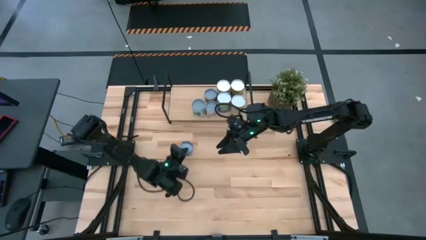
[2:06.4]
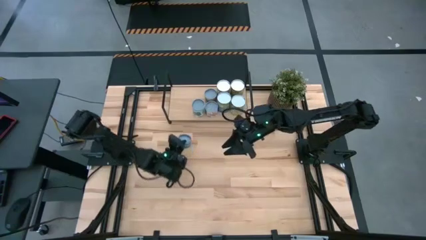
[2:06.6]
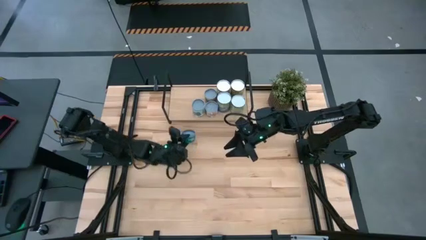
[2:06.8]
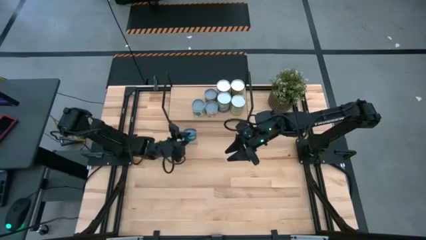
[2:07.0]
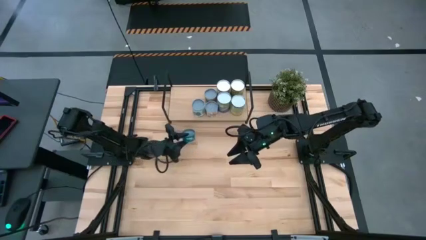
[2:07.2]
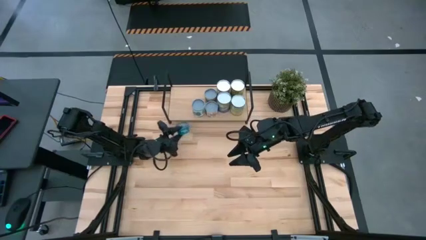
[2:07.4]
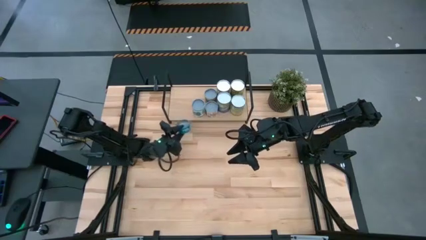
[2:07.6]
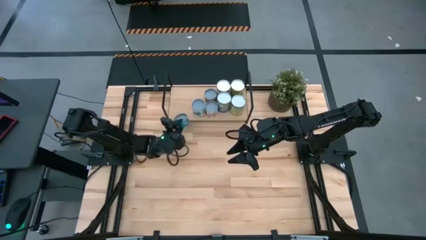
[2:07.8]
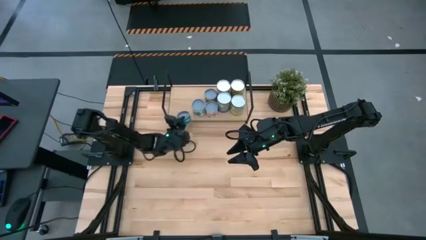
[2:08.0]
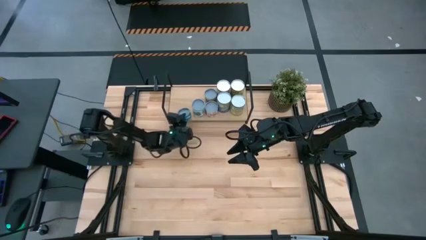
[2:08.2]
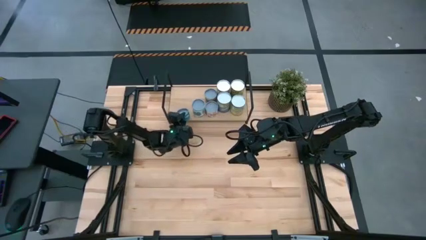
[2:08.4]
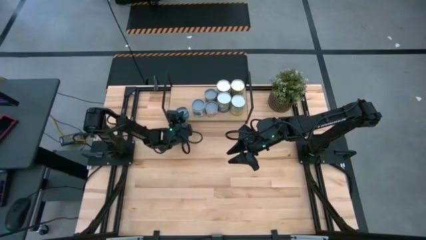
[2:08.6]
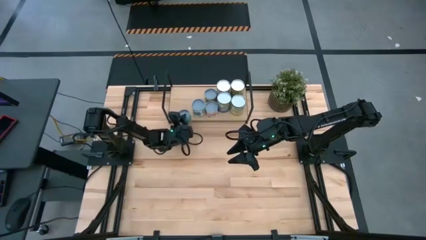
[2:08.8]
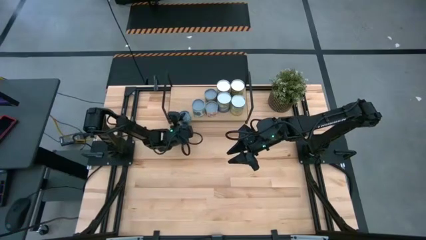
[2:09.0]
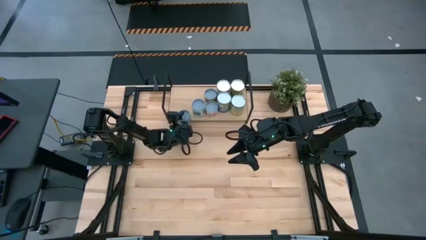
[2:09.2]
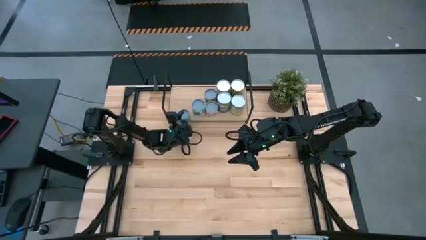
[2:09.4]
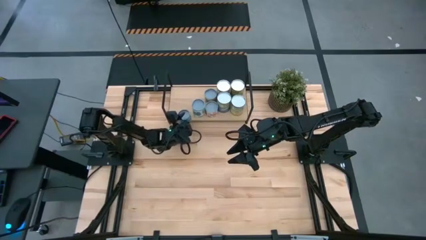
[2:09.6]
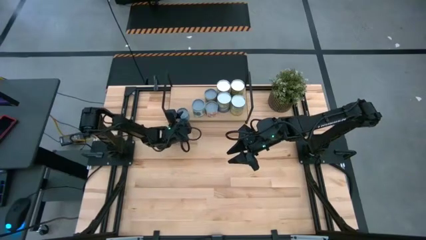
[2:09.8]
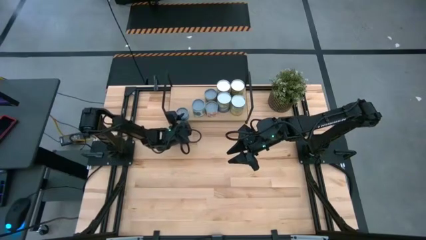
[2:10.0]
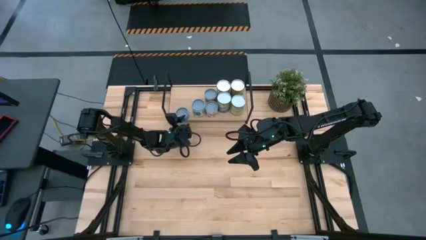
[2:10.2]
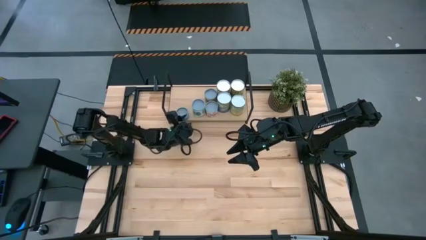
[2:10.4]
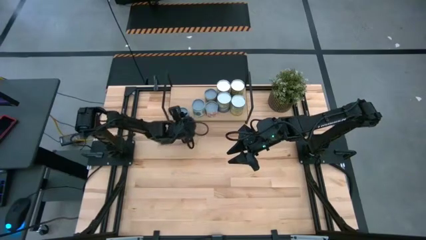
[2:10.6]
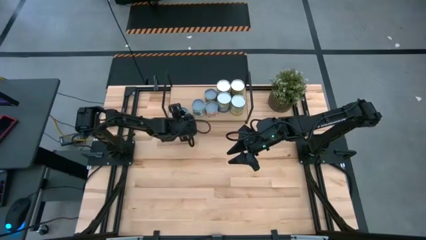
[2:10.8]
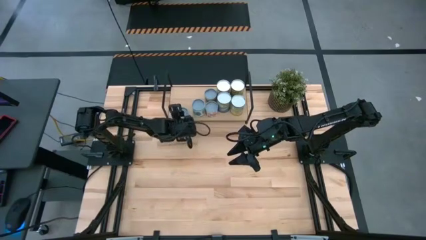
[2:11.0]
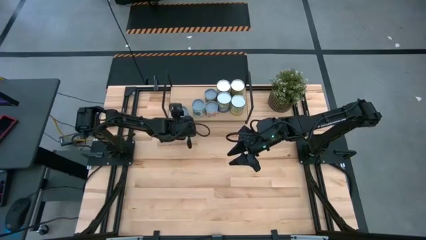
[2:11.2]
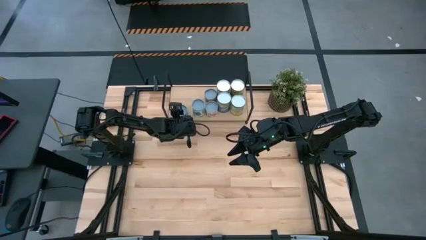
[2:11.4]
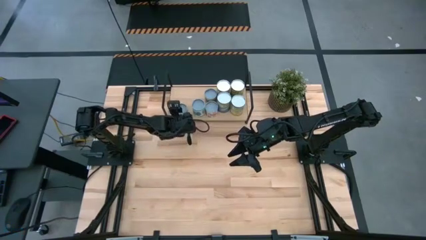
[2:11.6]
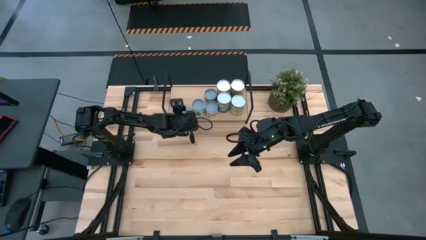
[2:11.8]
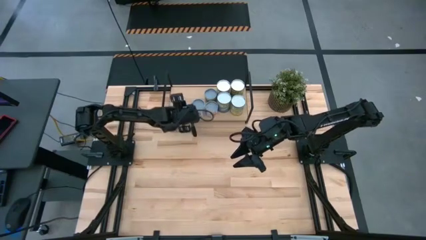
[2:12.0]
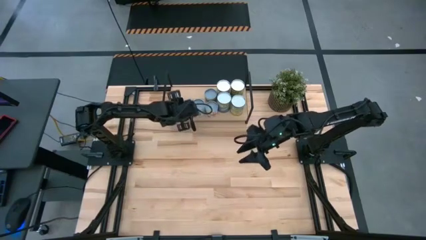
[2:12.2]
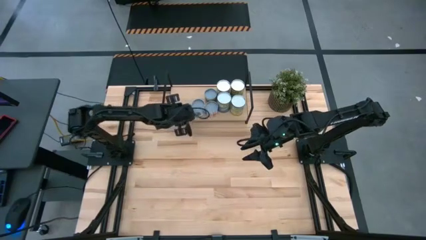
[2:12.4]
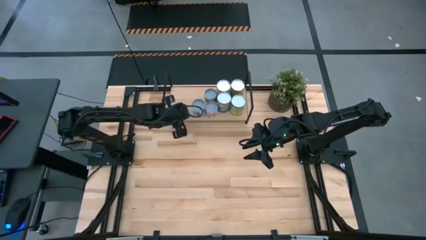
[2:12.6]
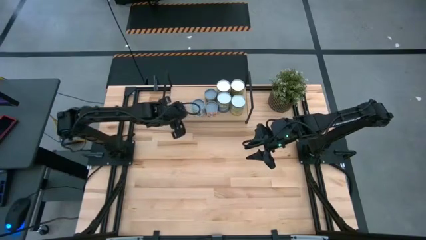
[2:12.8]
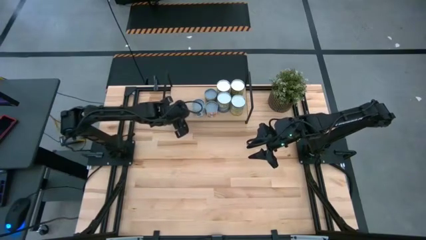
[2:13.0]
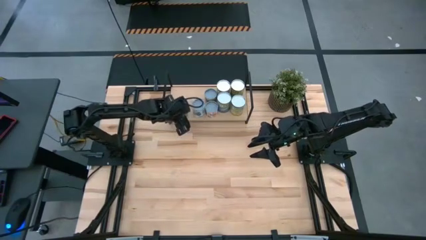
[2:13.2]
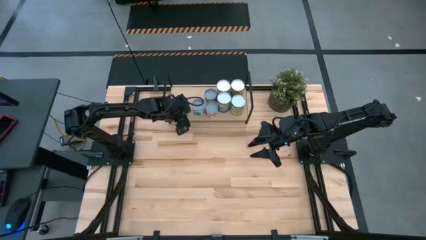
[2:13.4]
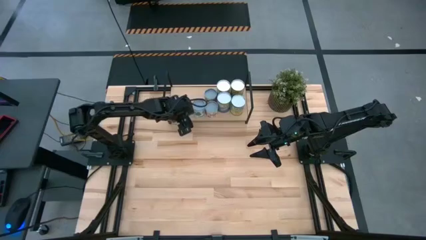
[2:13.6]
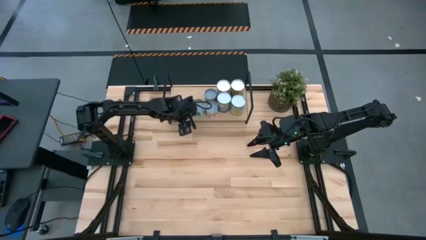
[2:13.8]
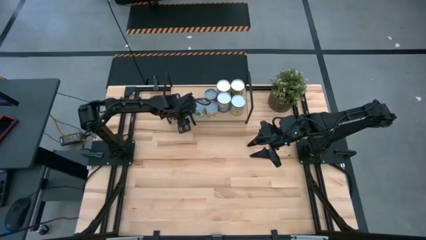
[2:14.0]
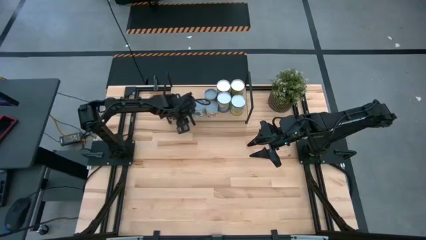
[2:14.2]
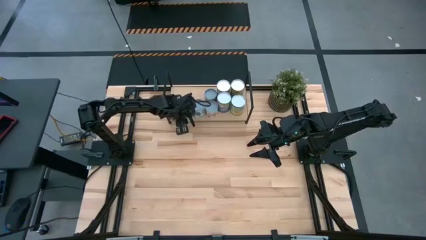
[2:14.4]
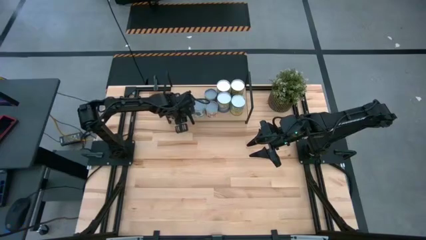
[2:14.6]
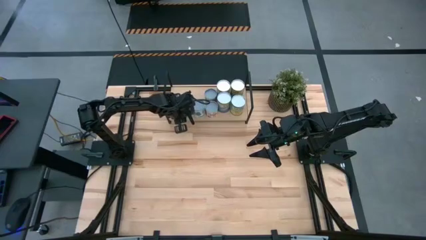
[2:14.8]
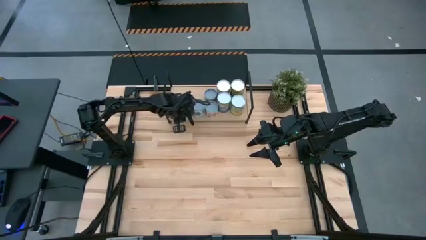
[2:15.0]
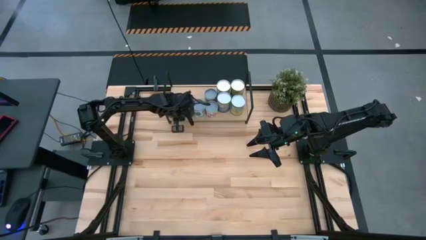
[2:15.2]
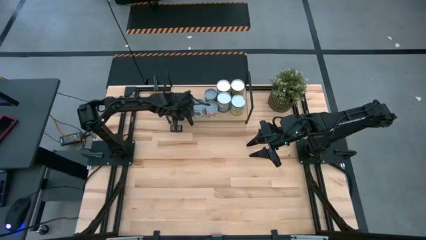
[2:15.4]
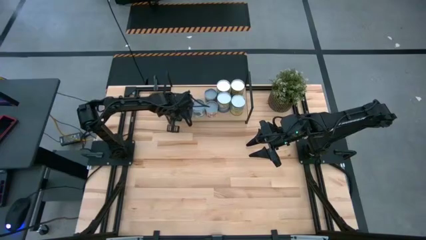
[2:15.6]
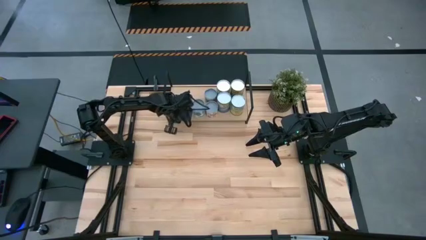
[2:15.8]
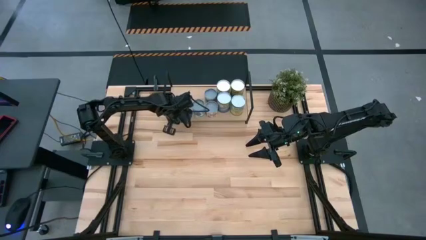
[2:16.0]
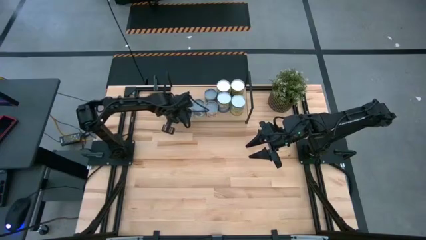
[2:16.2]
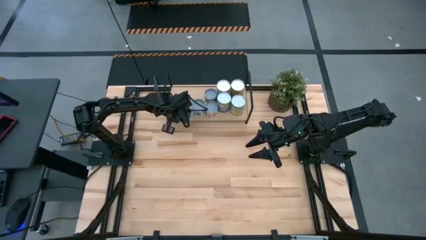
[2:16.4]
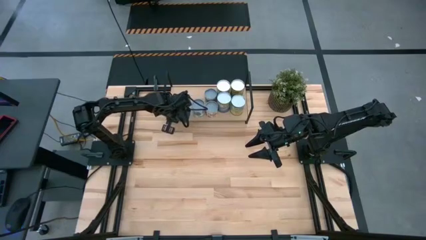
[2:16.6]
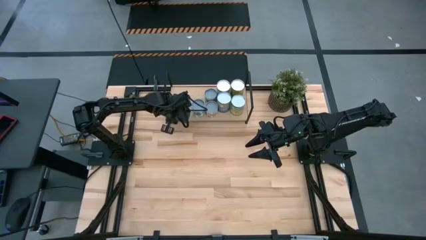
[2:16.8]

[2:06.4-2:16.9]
Task: Pick and place cans onto a shelf
Put the green tuna can on the shelf

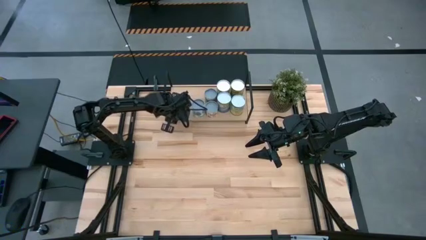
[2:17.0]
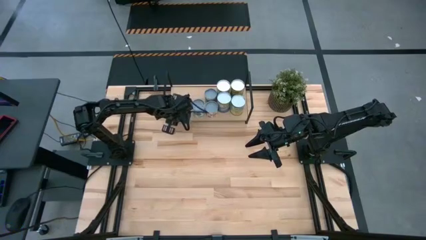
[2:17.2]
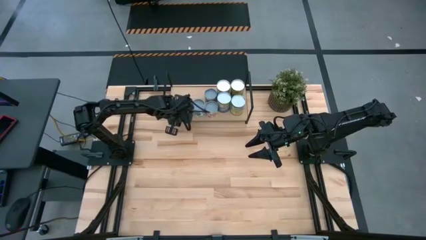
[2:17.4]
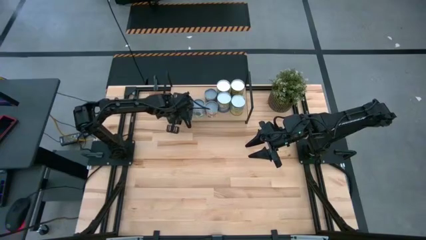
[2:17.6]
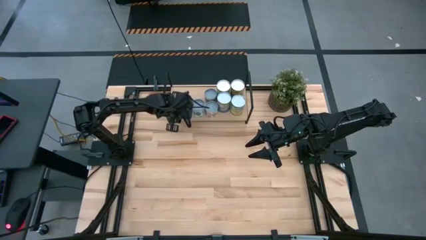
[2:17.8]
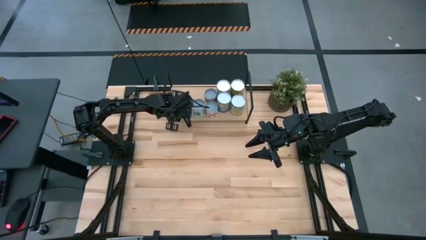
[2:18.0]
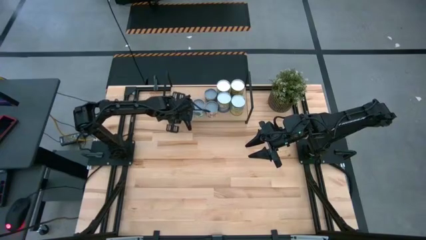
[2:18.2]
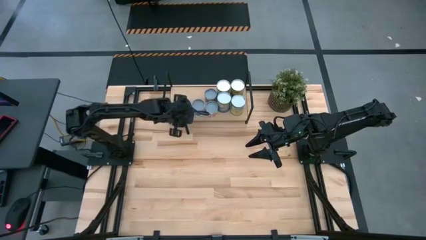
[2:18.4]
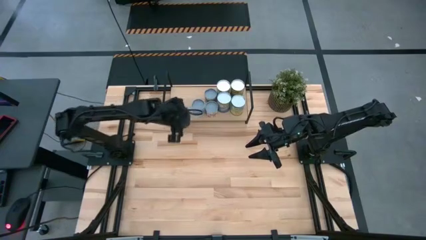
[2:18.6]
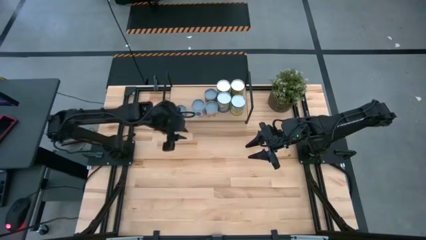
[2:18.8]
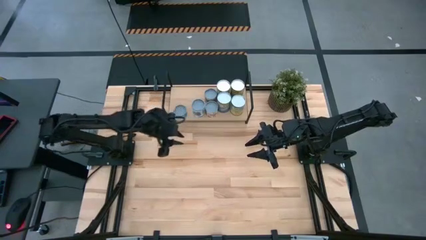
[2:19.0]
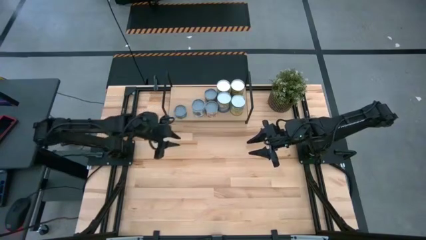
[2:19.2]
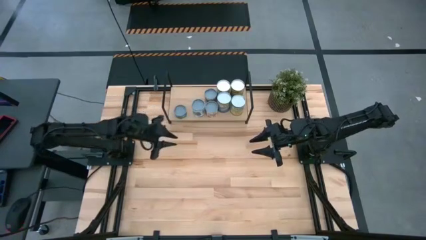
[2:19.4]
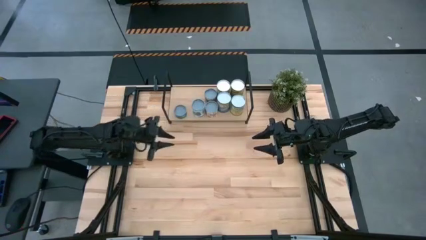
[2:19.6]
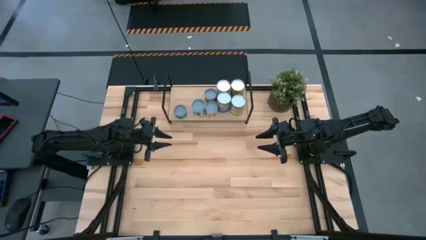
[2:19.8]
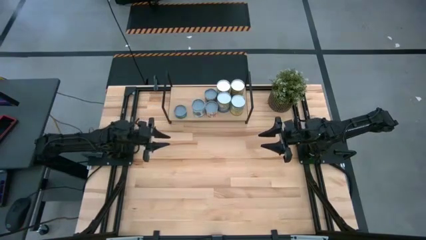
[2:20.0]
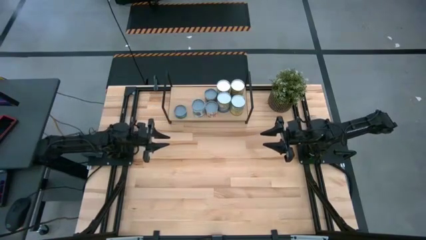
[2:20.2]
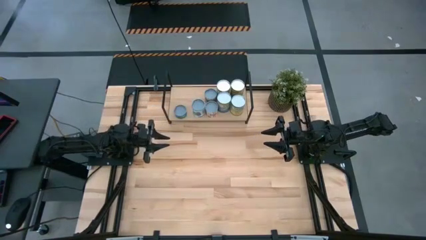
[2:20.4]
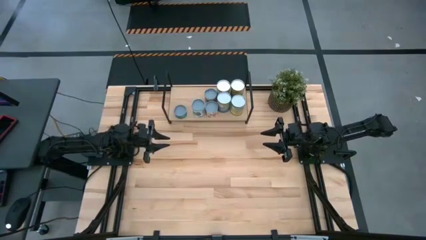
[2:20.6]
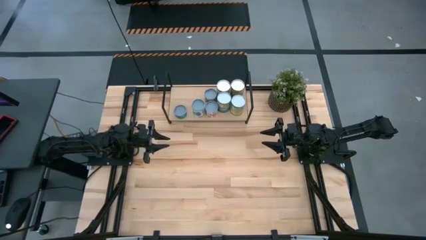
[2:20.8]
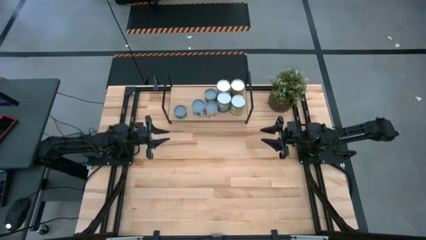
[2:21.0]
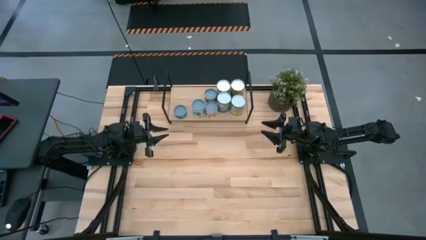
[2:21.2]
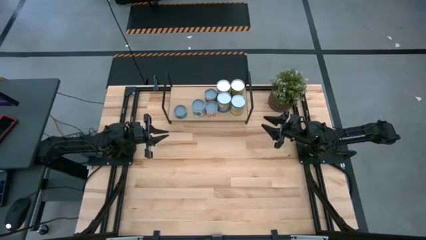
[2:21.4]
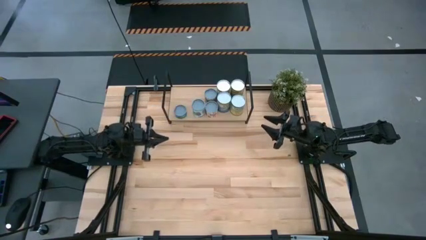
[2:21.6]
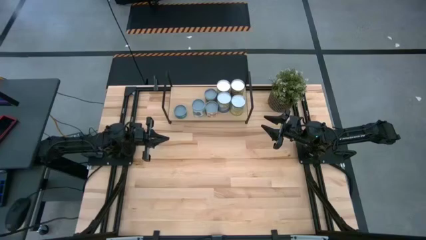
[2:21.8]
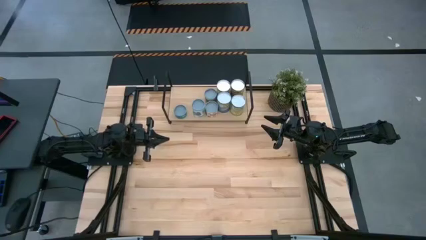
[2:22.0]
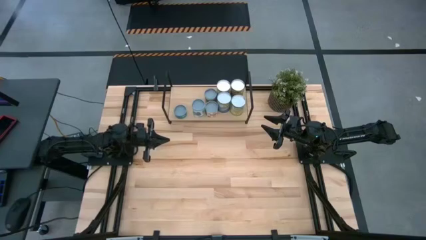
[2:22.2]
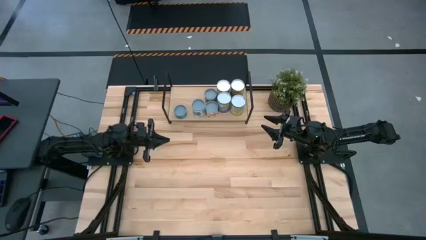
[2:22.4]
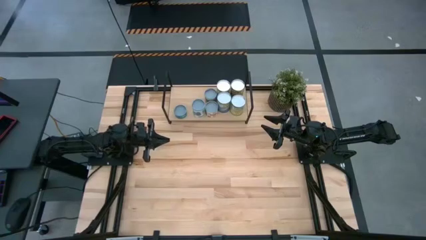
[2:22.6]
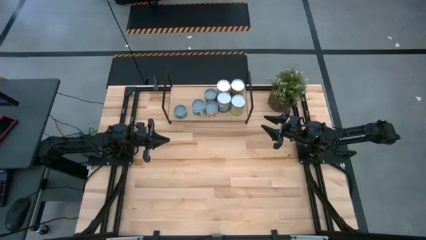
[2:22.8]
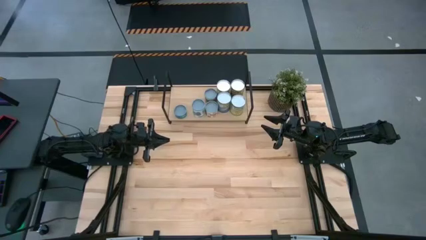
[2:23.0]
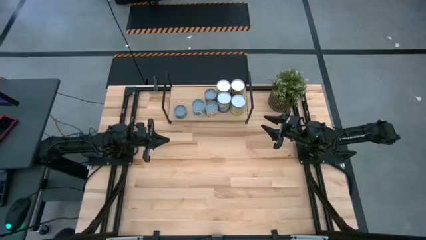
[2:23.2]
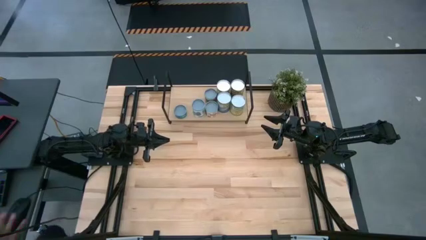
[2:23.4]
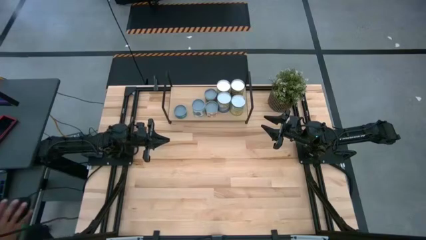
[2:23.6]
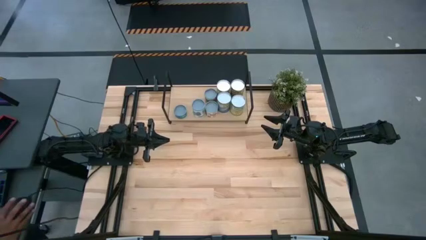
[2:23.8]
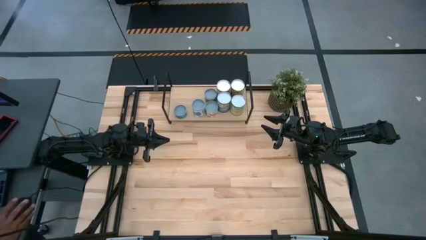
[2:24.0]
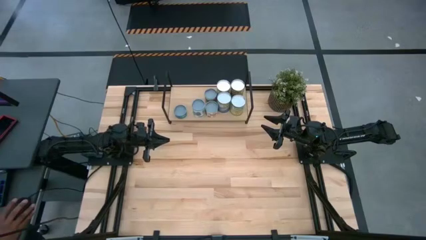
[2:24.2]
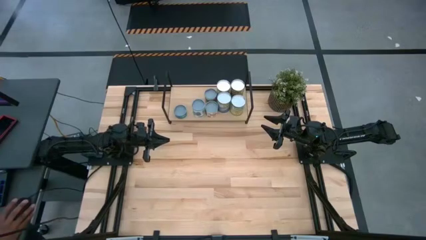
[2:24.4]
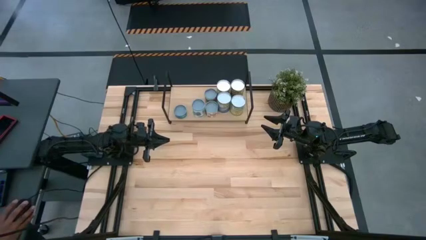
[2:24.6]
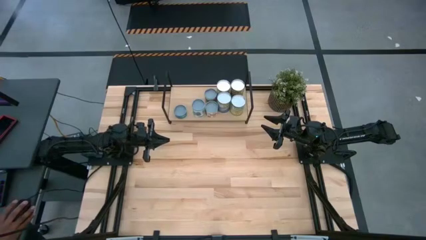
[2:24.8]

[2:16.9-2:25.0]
Return to Home Position
